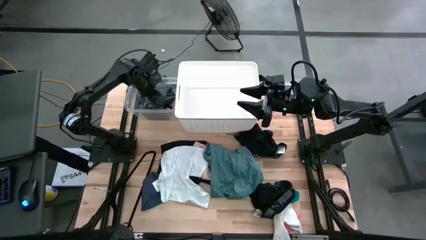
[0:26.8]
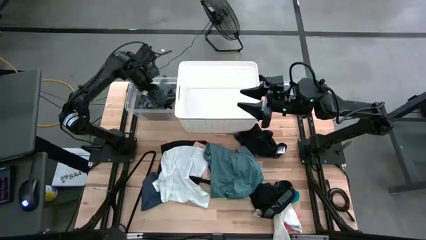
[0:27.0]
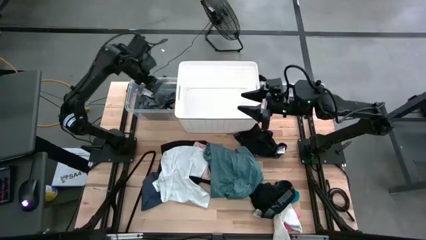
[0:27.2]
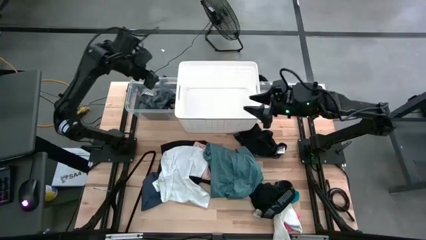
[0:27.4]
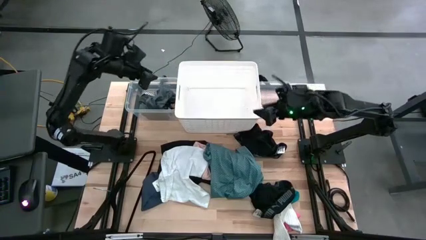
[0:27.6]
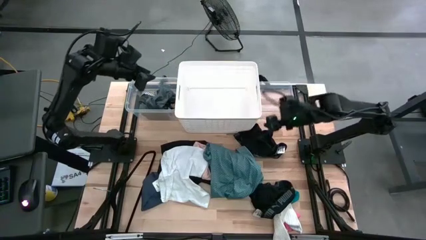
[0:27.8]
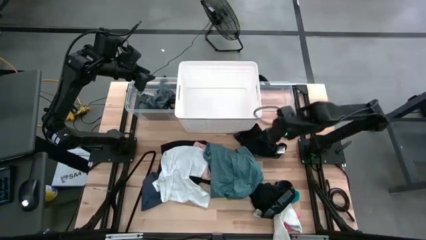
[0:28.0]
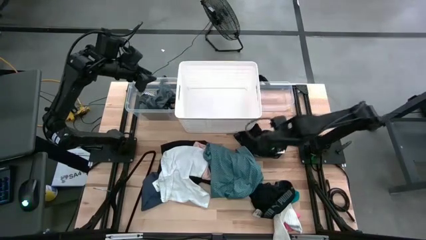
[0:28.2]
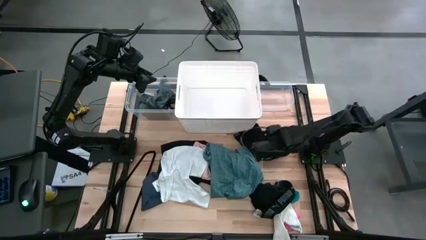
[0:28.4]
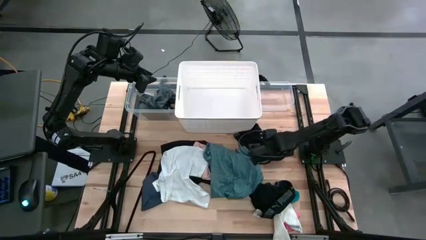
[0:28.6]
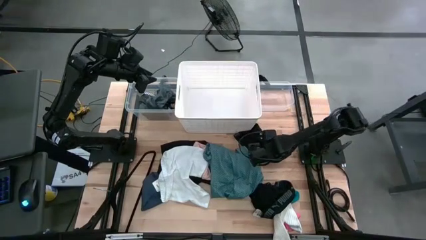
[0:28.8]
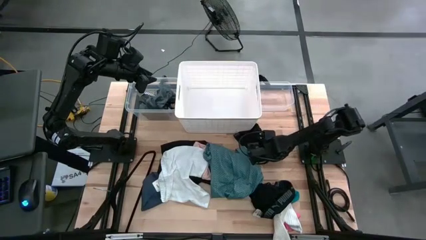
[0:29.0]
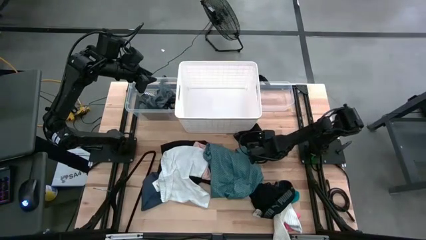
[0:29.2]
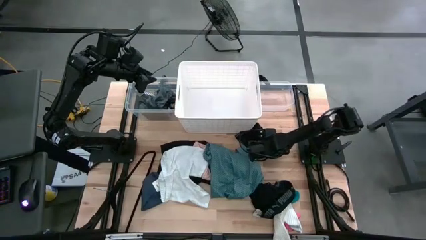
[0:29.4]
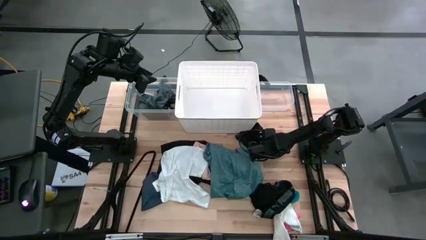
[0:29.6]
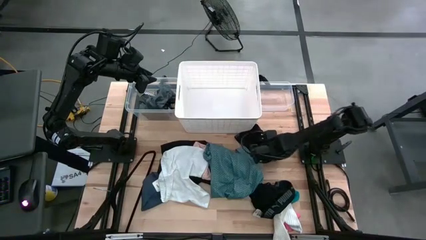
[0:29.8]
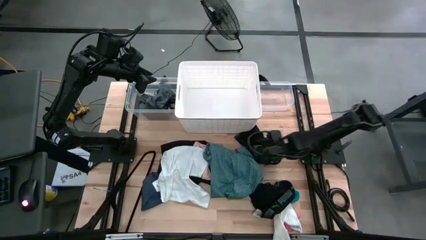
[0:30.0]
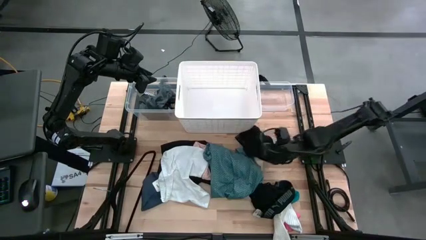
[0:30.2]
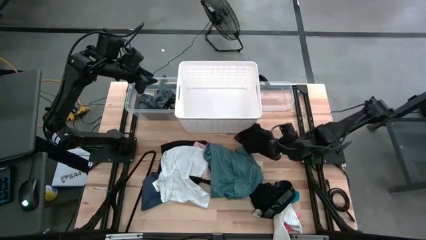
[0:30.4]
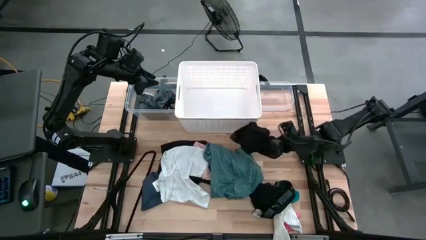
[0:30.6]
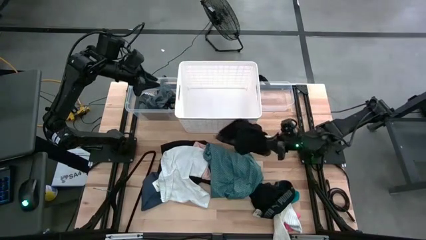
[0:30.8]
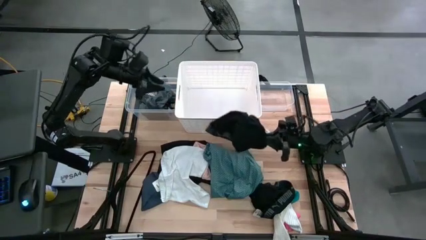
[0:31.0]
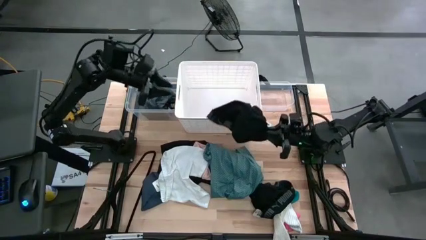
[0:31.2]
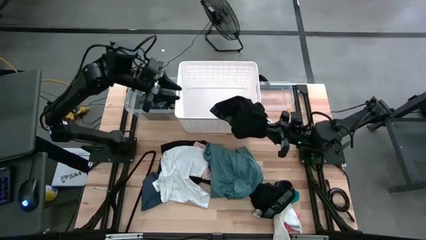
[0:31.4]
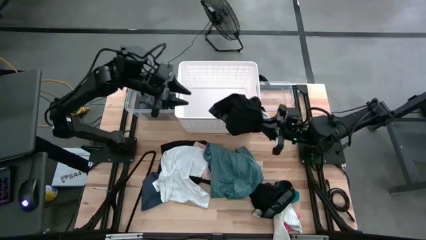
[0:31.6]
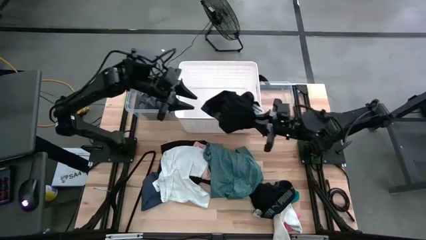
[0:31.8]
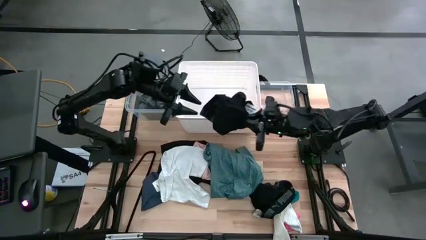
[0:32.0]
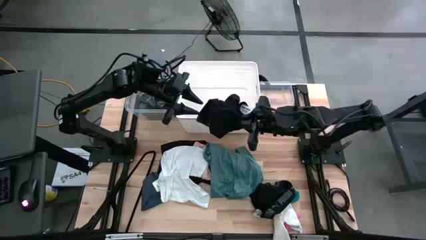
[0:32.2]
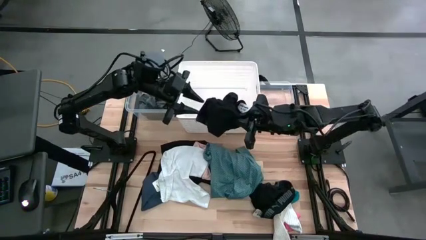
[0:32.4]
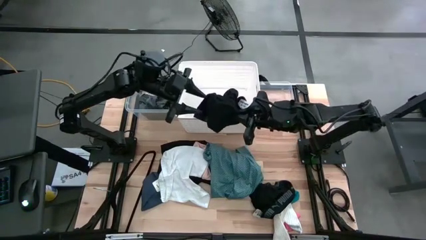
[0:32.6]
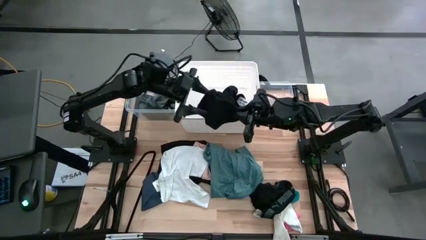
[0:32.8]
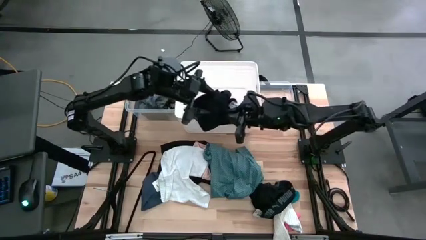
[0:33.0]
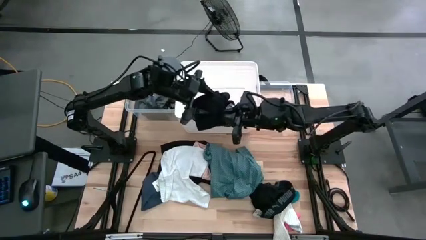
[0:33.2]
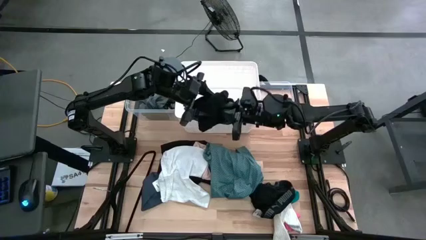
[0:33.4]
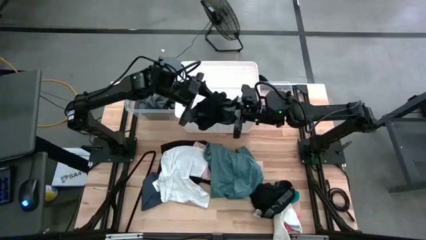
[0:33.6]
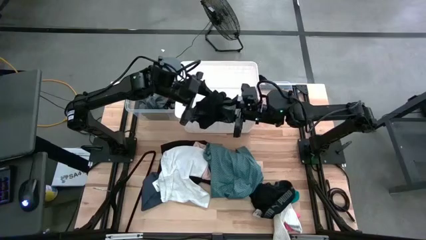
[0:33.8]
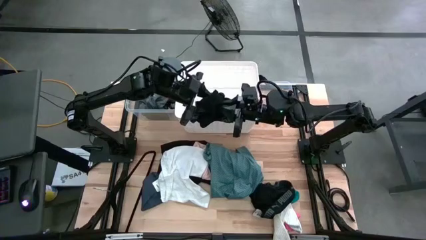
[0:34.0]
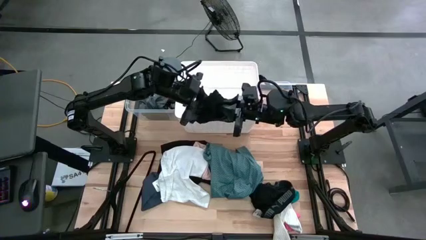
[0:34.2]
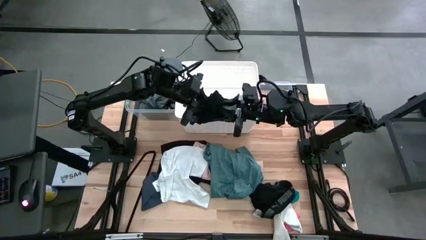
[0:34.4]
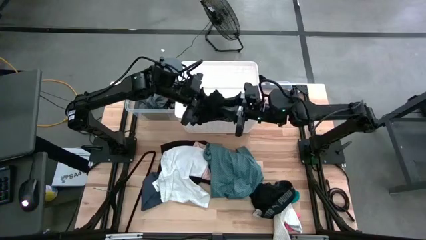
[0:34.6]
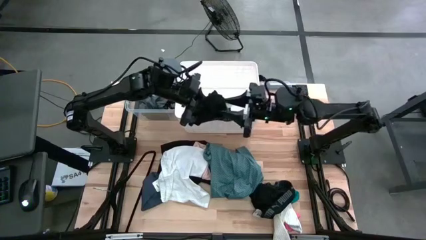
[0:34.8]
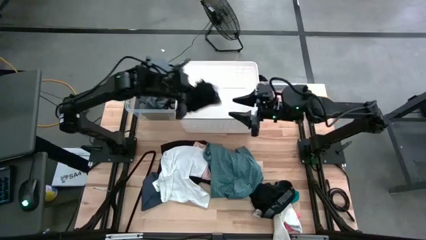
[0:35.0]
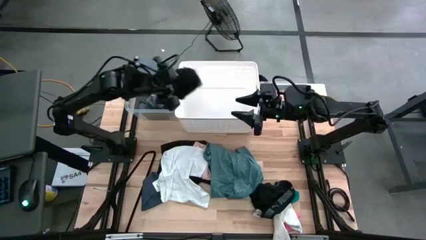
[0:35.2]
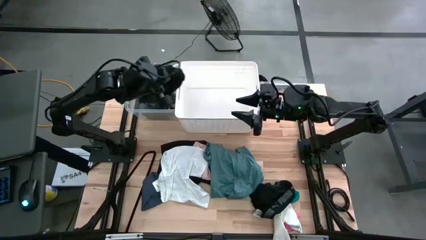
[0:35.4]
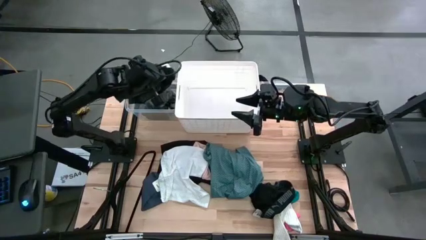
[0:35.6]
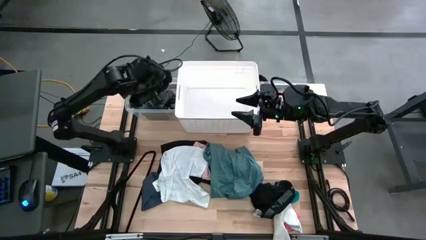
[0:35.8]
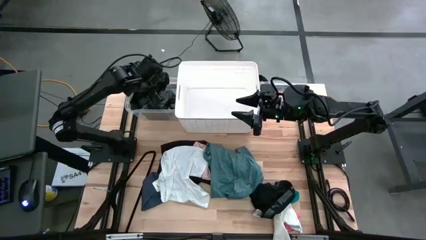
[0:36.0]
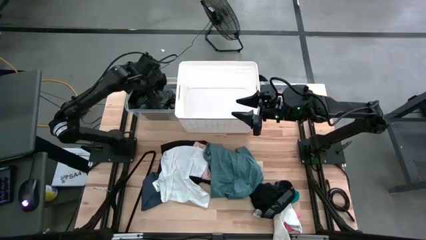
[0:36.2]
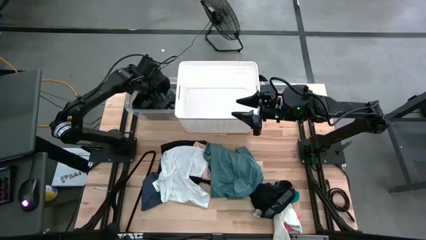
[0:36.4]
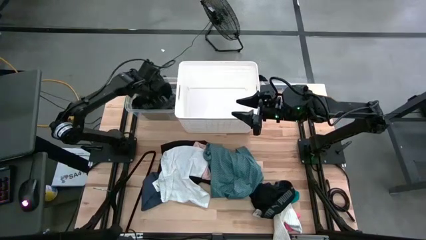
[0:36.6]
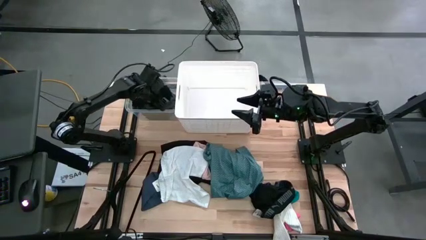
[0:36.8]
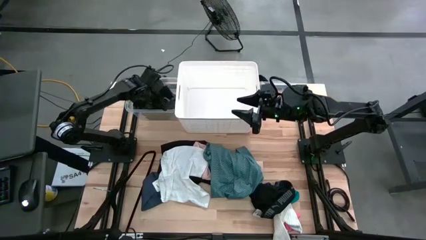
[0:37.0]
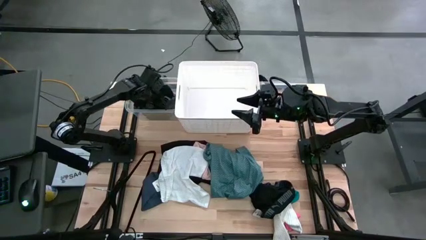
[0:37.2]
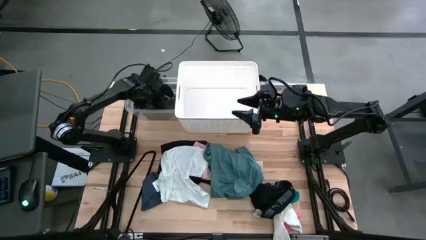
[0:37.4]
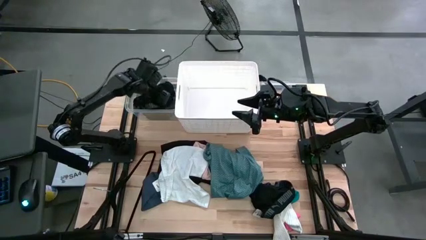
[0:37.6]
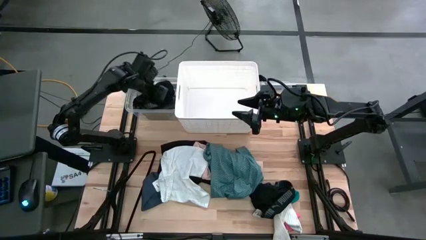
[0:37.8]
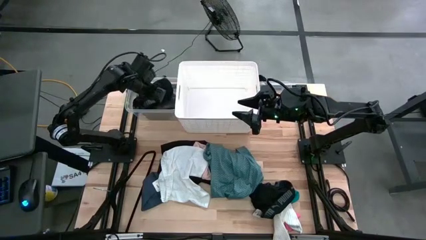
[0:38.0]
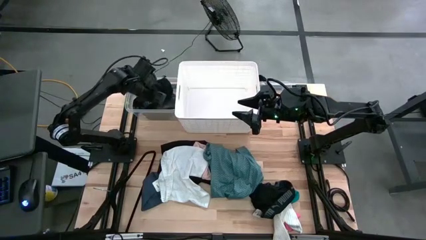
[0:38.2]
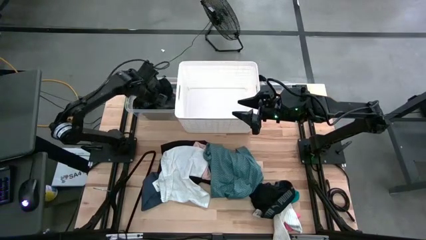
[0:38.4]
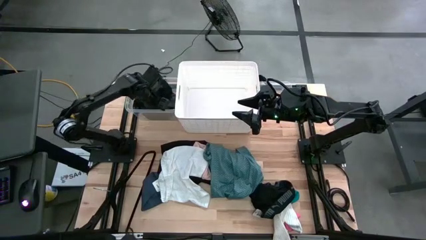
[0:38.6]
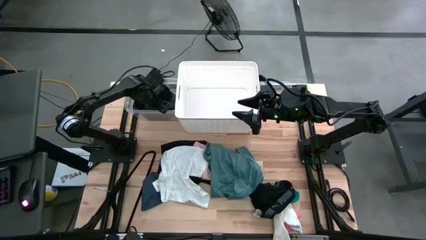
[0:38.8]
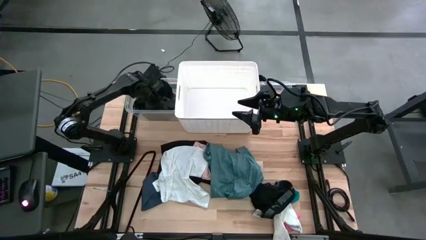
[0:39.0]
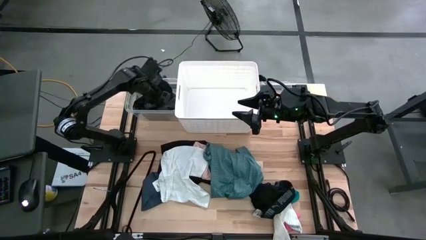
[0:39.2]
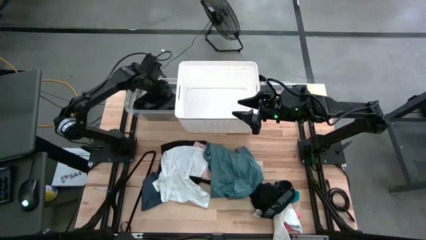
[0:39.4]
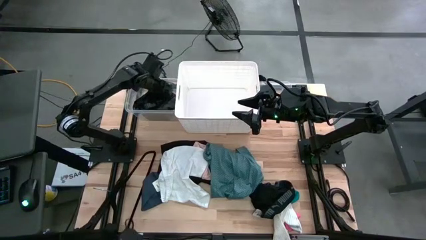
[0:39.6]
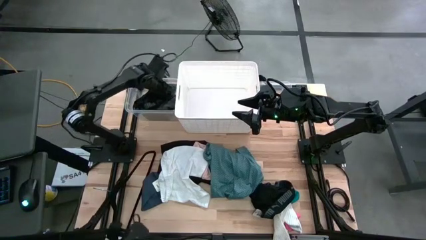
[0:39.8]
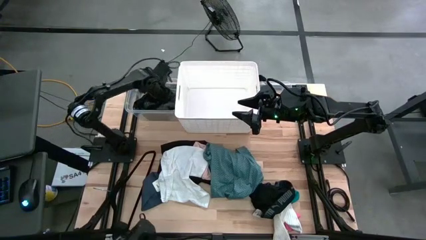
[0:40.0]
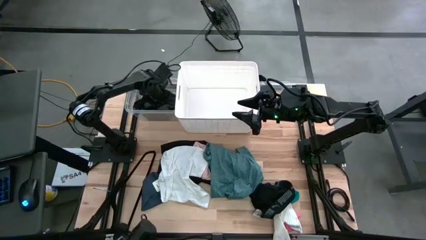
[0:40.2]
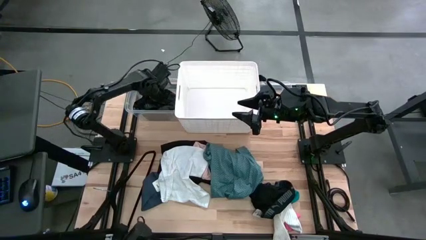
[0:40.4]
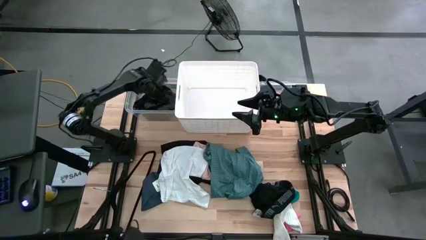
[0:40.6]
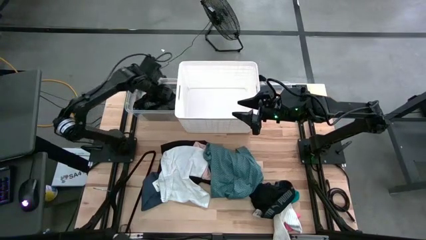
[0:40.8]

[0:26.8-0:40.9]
Task: Pick & Place Cloths
Put the top black boxers into the transparent bin
